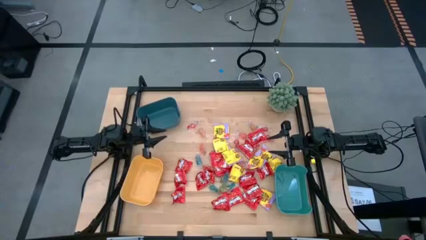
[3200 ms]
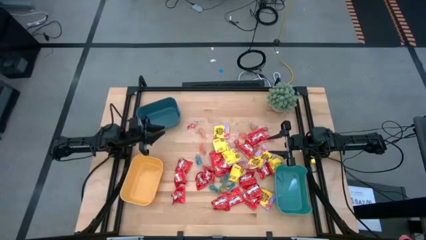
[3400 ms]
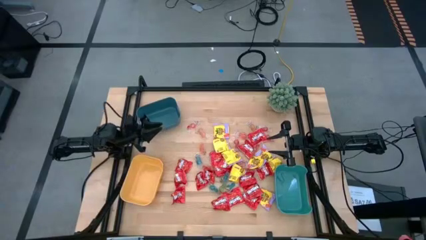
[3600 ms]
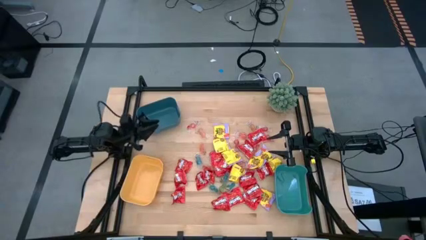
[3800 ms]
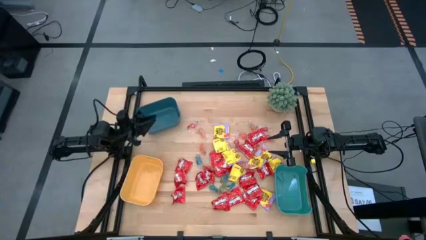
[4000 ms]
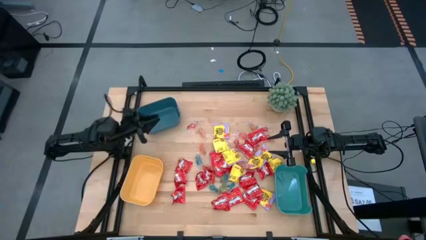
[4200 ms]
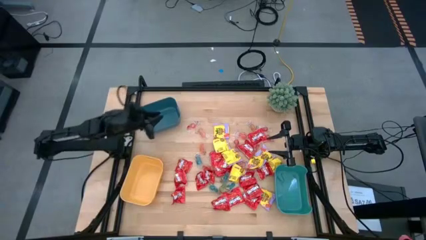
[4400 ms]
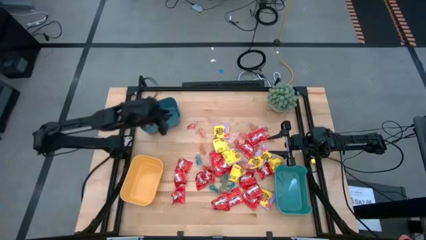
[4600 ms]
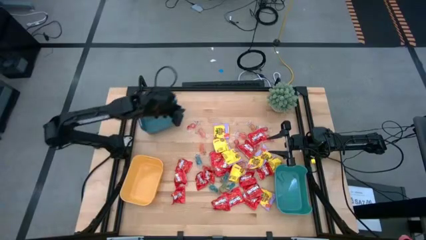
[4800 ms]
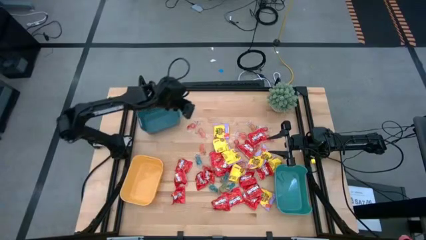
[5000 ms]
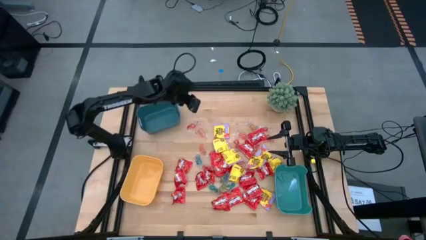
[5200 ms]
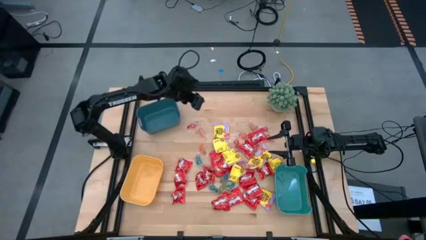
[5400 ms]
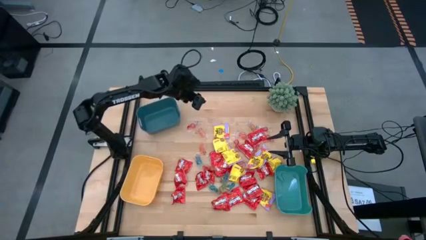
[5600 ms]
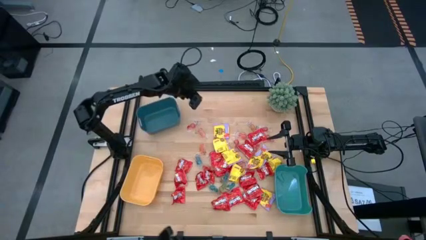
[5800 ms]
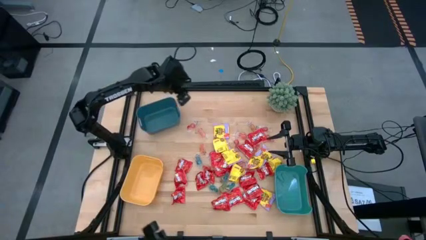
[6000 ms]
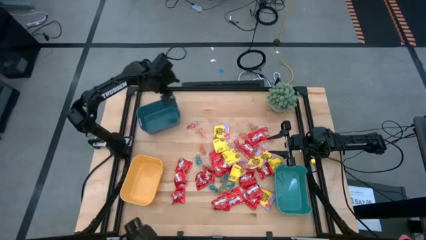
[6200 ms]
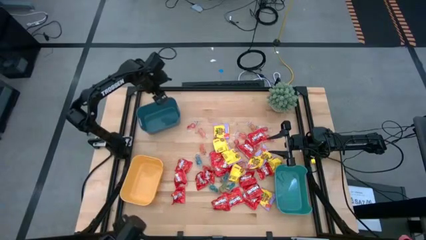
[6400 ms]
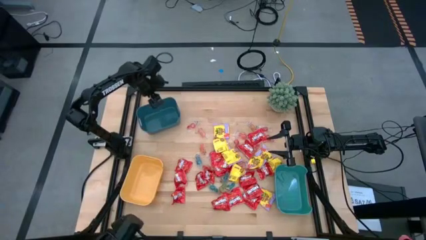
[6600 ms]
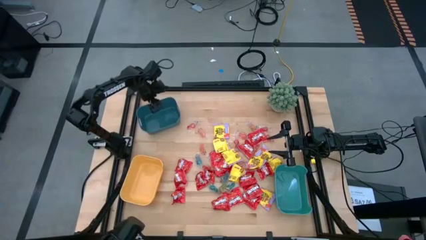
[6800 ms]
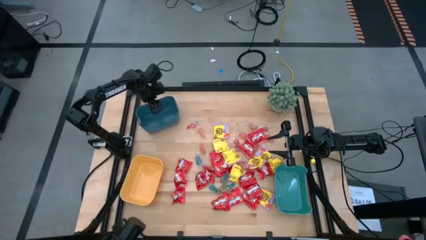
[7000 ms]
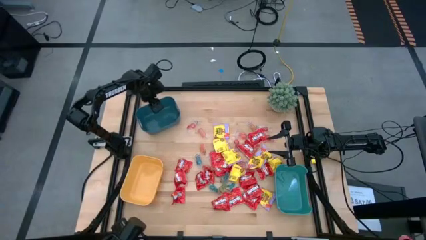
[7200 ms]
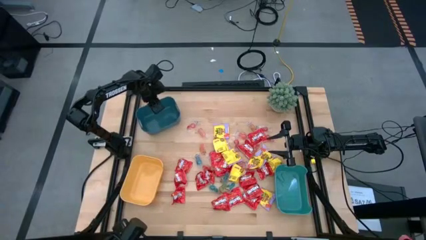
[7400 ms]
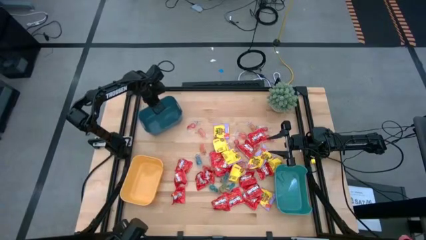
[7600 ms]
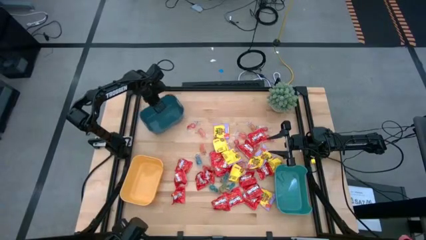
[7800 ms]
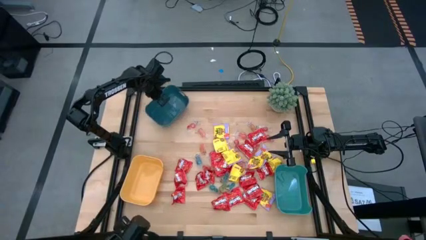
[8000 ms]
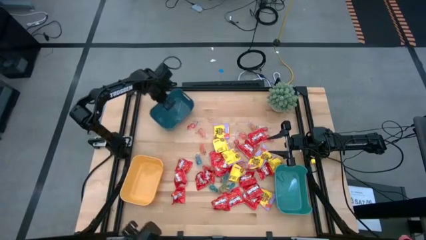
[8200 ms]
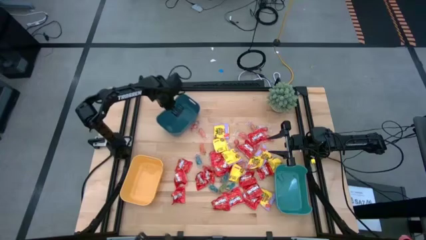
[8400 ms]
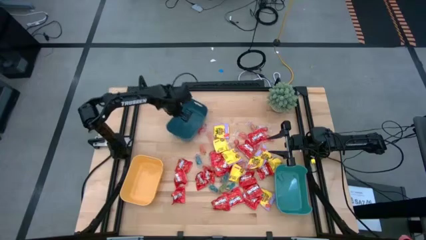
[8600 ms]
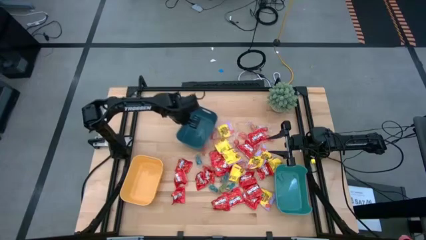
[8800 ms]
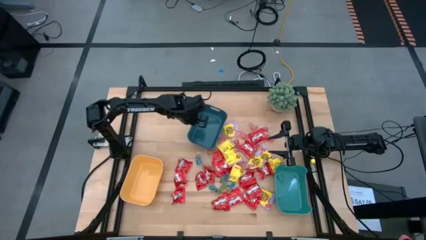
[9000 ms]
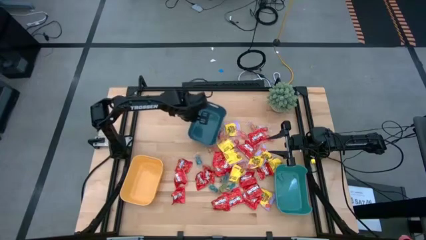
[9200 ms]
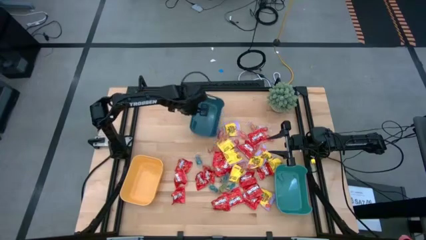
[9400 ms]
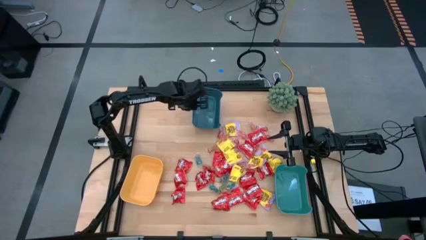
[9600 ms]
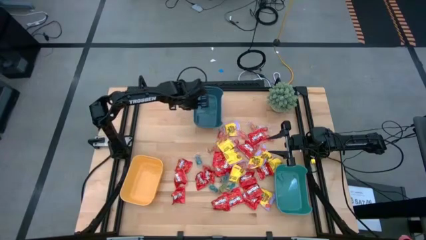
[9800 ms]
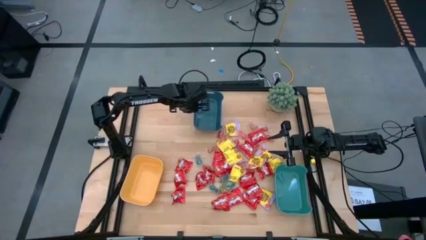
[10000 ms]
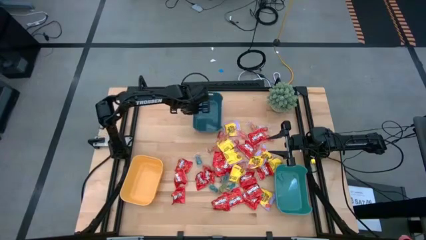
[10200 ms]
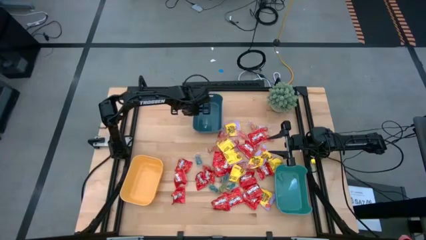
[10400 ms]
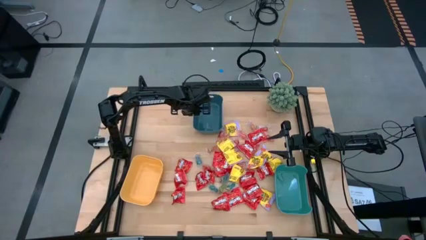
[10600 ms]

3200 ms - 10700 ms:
Task: Sort candy
Move the blue bin to the top center of the table

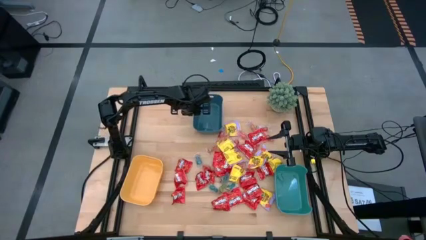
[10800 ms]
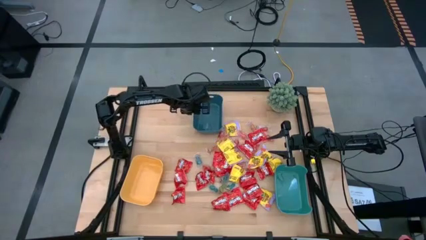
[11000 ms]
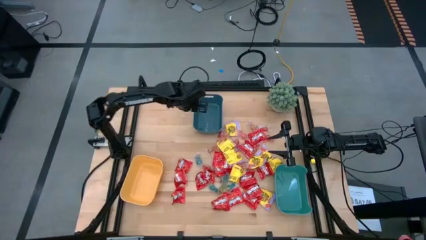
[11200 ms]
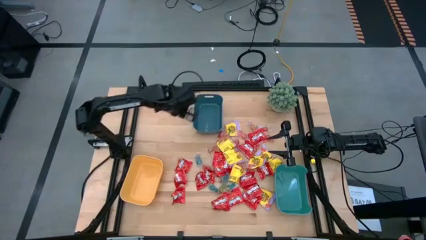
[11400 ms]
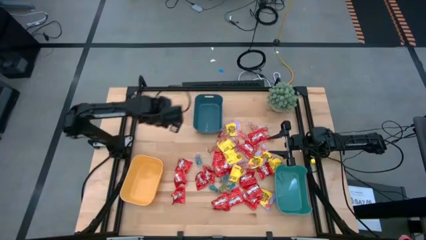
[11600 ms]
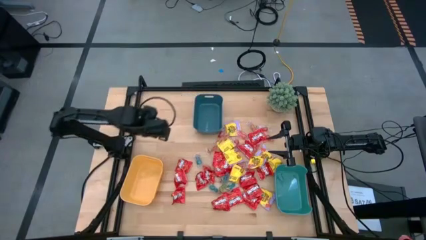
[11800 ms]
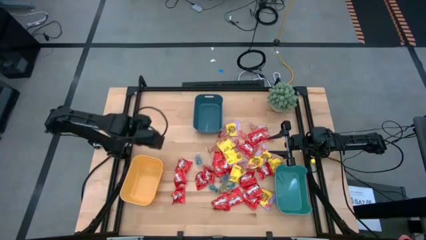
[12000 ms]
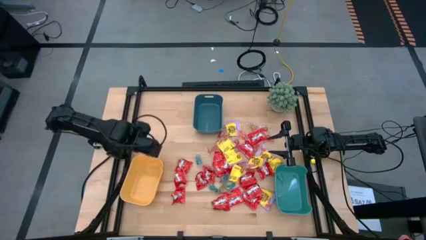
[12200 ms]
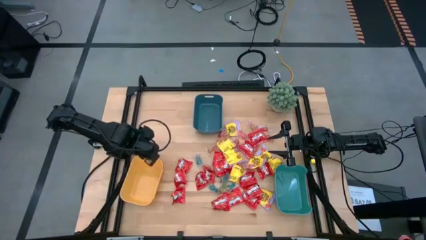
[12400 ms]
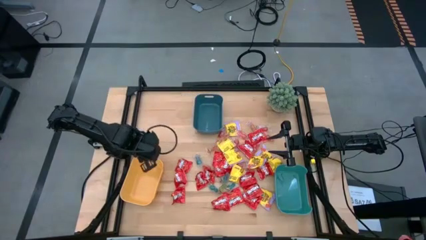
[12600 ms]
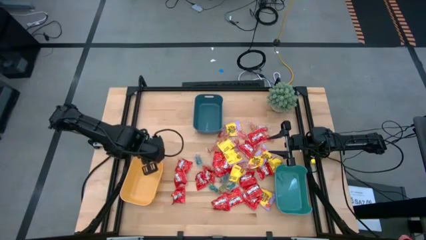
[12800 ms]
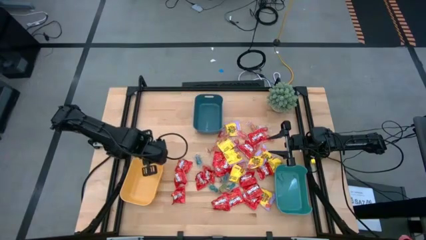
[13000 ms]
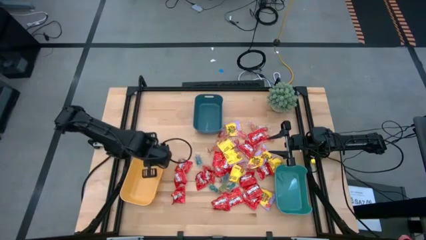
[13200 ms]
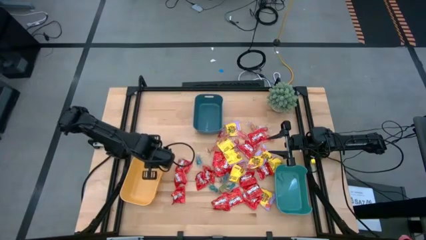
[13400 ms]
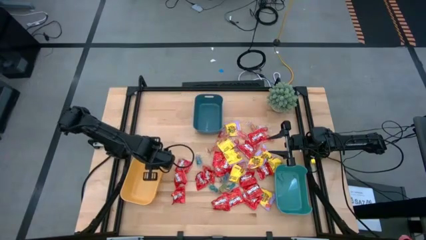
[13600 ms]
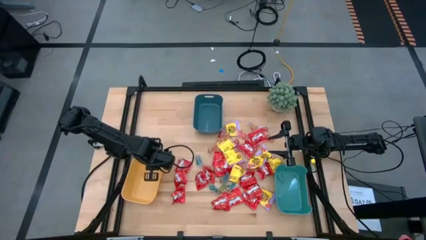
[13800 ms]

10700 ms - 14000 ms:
Move the yellow bin to the top left of the table

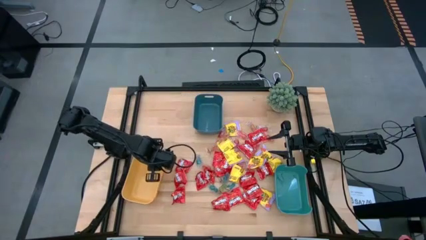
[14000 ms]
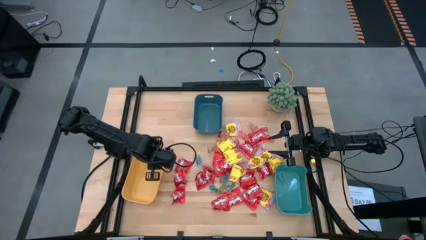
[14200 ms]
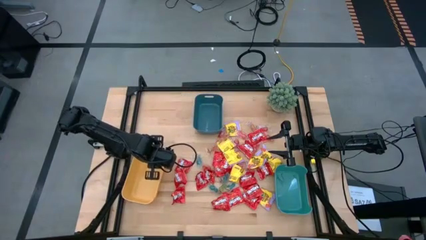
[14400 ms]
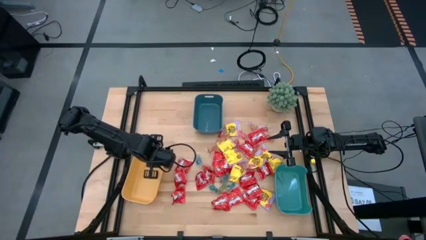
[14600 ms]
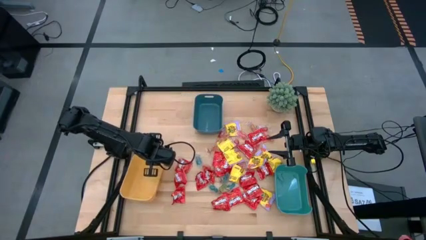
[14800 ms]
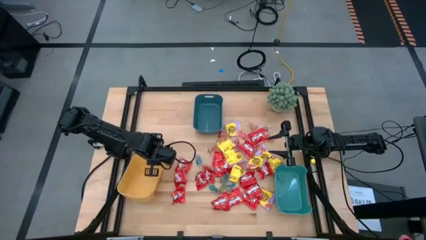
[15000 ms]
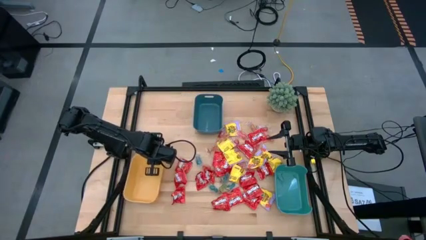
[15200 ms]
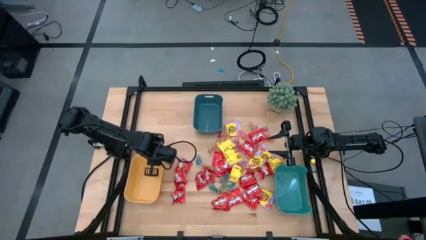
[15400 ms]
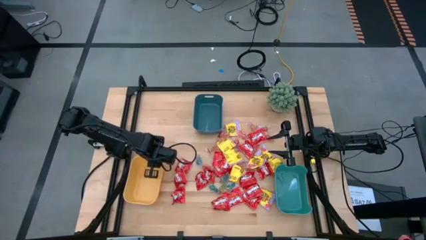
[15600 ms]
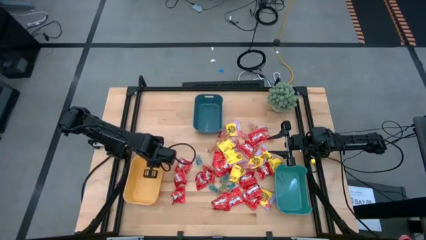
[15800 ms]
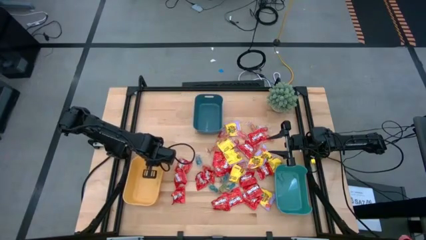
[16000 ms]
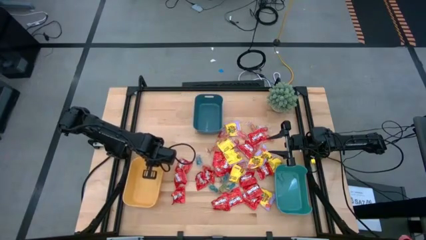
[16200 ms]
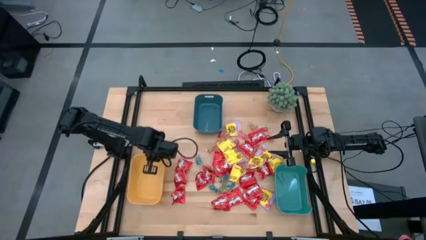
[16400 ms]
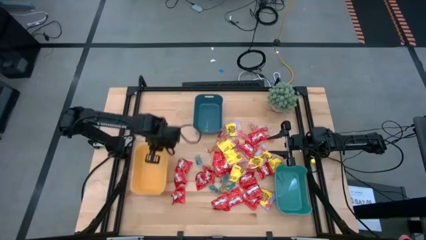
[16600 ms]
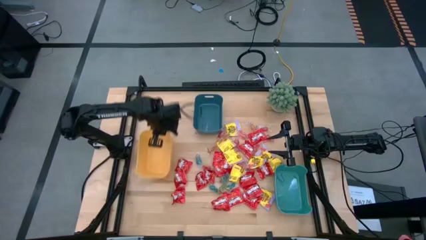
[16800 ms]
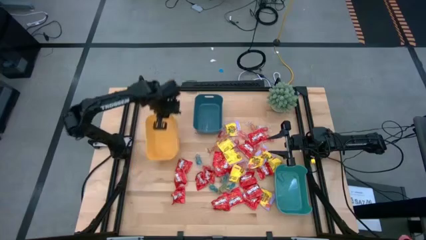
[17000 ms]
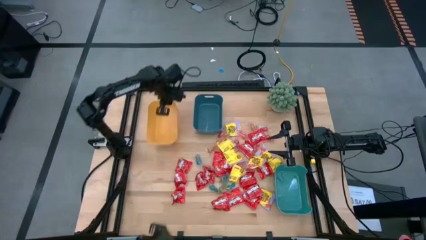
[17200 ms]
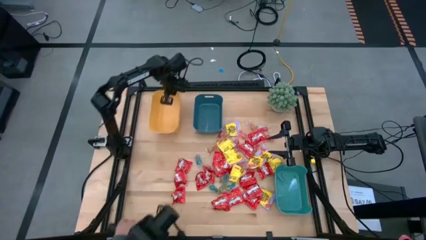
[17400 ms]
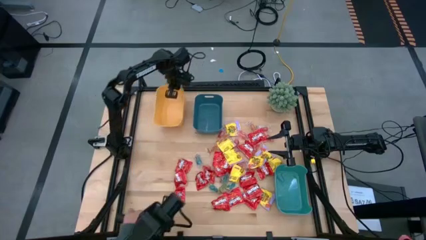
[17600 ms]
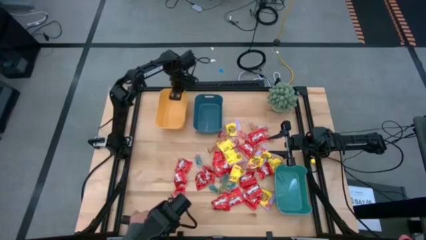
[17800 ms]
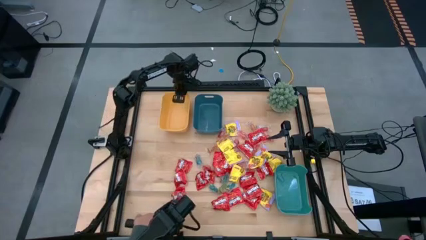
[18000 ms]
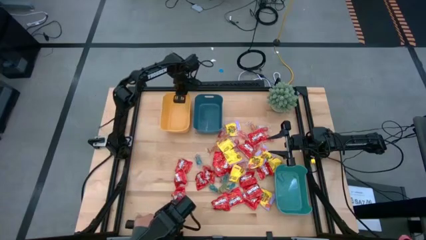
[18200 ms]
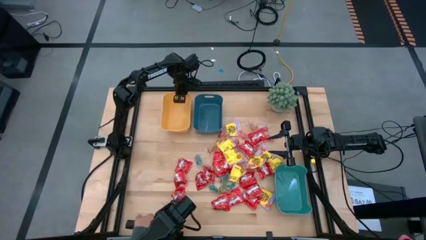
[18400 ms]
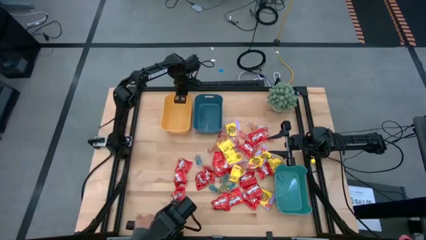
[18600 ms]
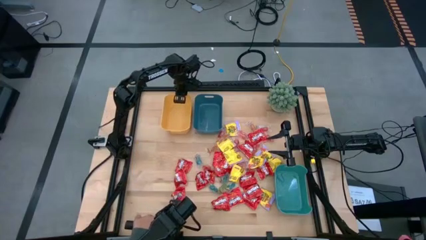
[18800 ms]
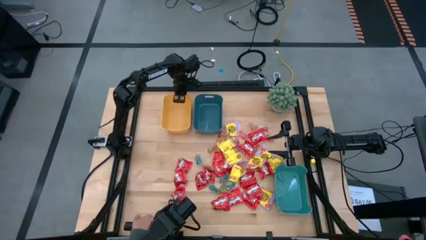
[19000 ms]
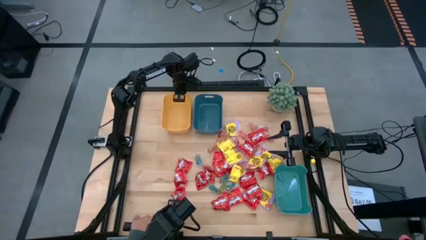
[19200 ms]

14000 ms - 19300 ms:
Move the yellow bin to the top left of the table

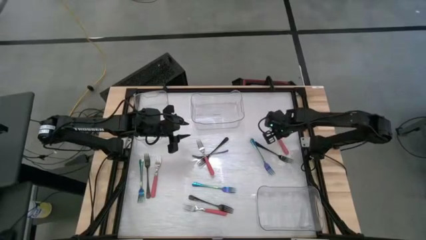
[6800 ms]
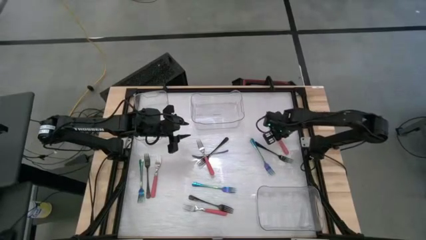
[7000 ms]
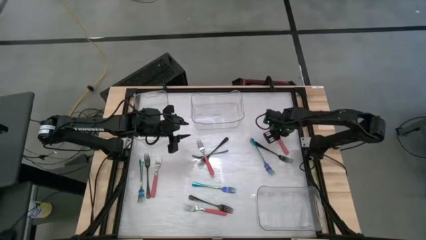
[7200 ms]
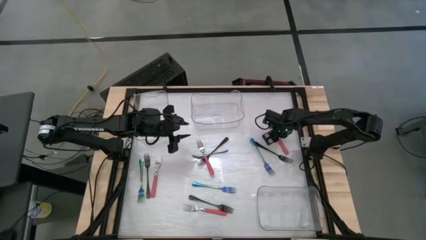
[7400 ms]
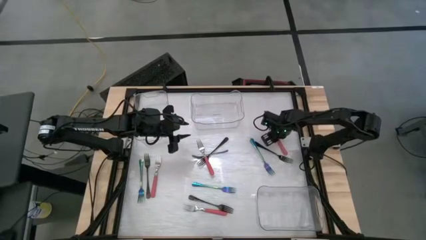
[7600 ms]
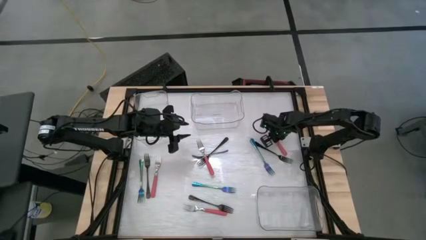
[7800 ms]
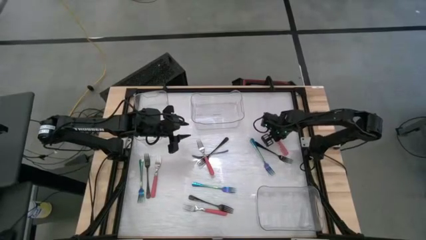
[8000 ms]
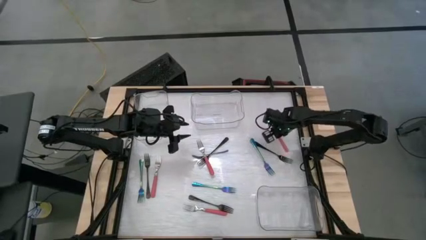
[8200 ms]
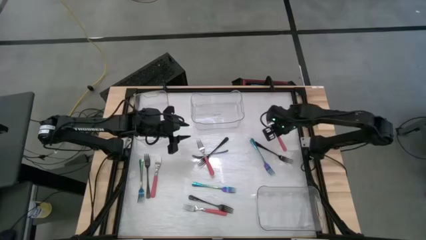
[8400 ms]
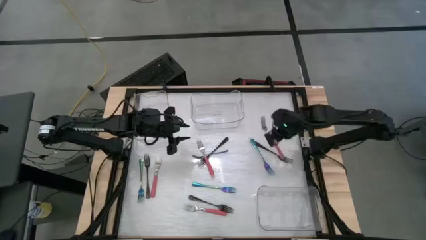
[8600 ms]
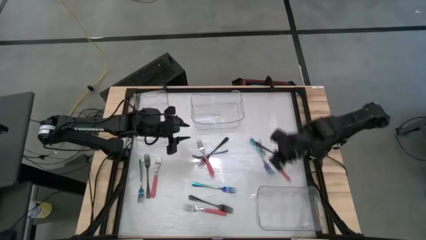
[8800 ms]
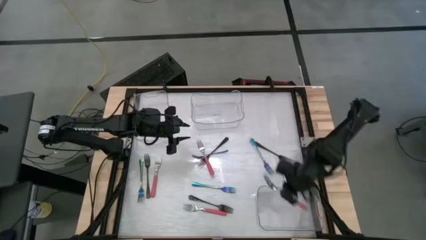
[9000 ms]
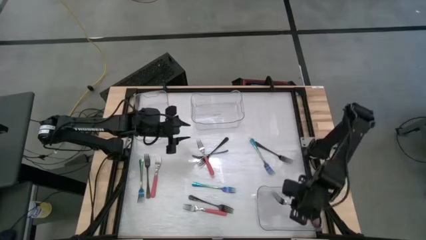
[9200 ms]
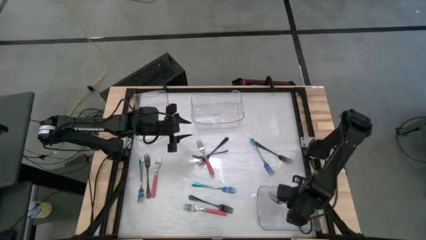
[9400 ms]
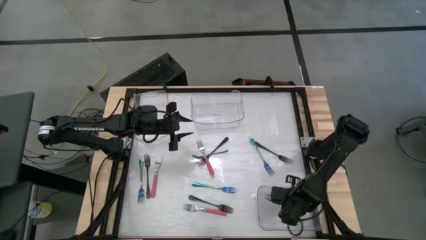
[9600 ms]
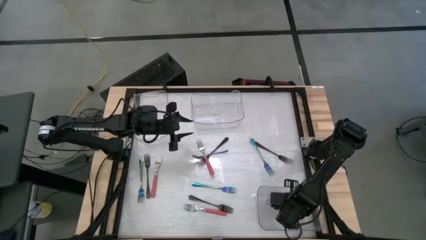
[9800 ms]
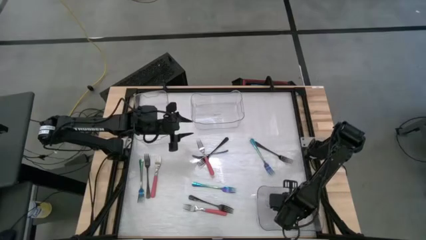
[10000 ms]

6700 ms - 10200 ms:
Task: Sort silverware by color (type)
Put the pink fork into the bottom right transparent bin
